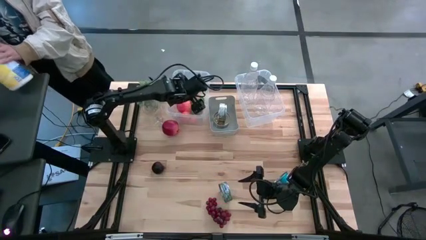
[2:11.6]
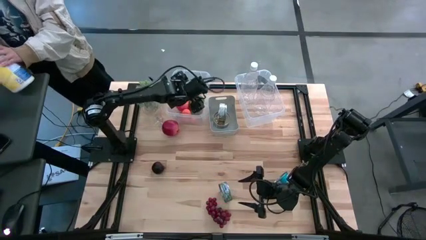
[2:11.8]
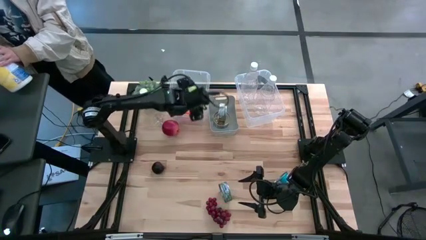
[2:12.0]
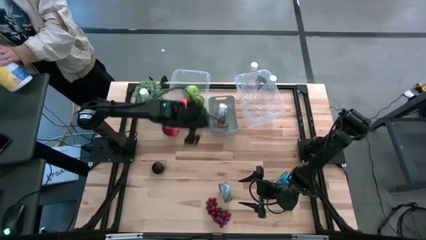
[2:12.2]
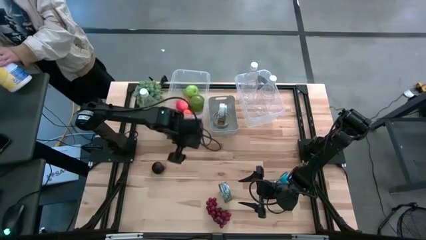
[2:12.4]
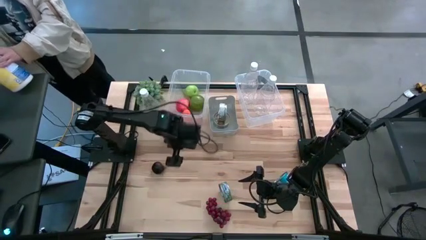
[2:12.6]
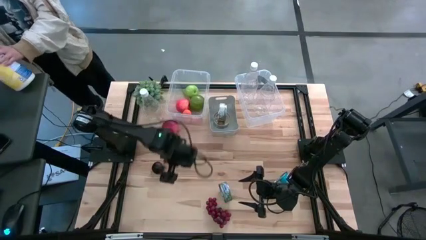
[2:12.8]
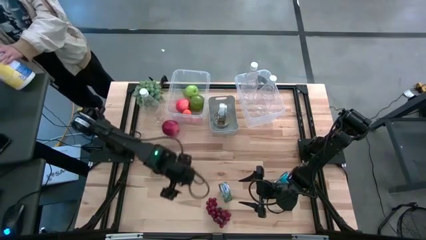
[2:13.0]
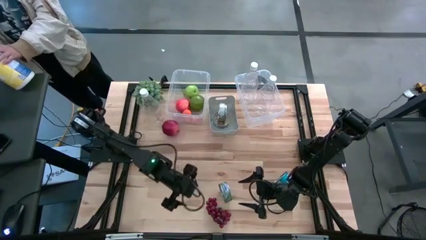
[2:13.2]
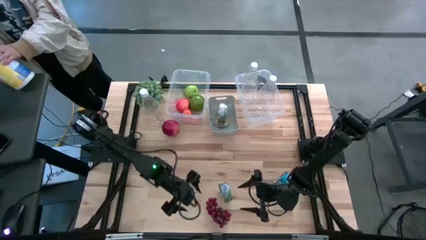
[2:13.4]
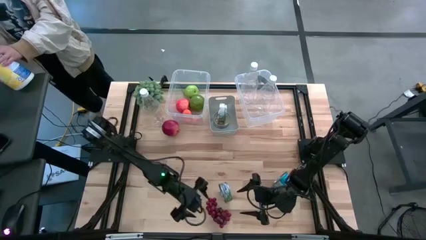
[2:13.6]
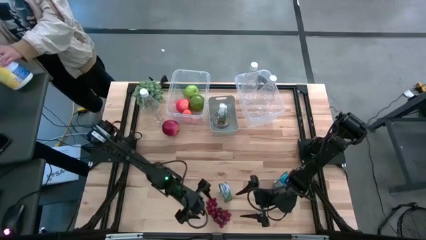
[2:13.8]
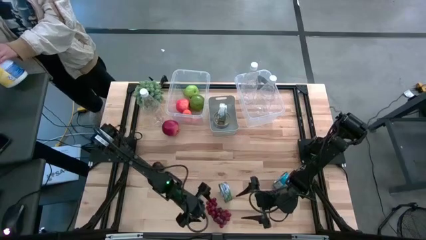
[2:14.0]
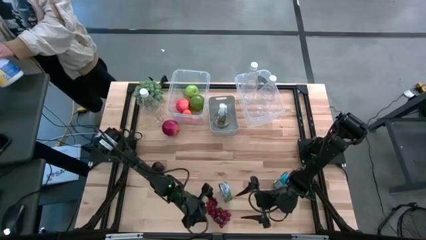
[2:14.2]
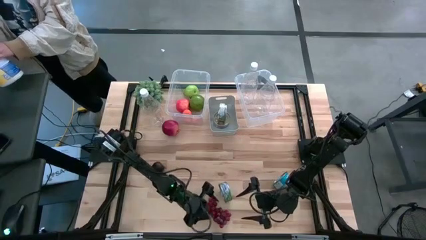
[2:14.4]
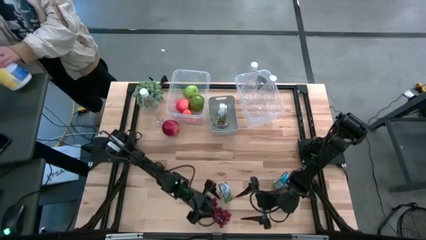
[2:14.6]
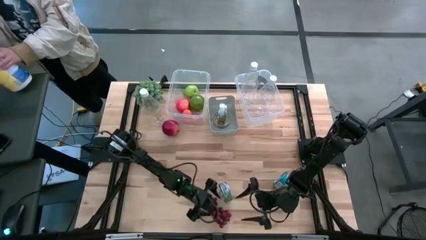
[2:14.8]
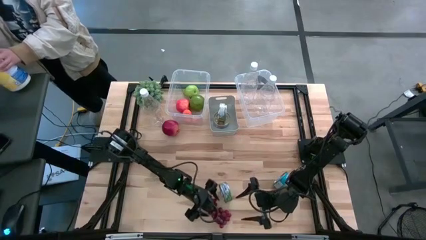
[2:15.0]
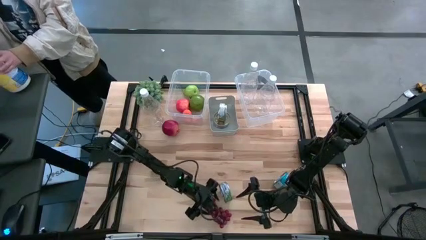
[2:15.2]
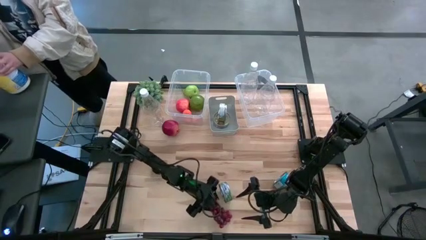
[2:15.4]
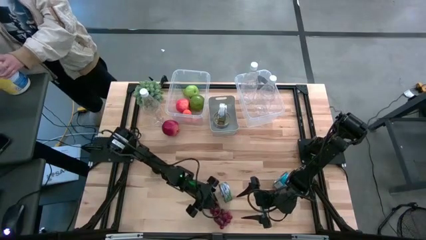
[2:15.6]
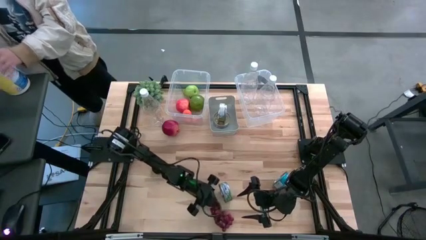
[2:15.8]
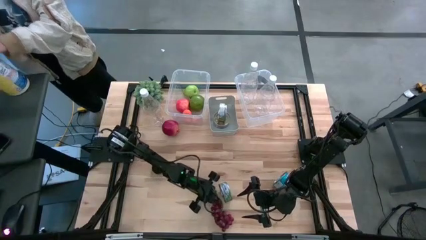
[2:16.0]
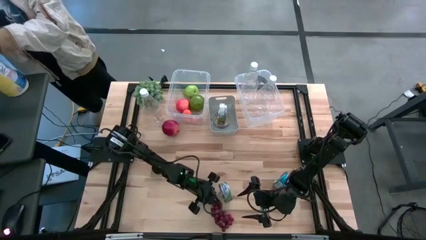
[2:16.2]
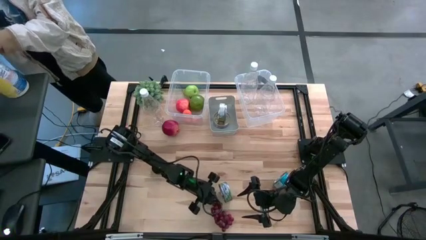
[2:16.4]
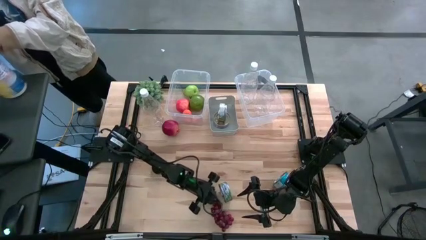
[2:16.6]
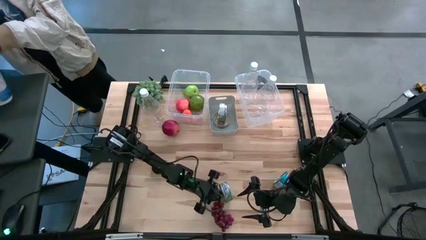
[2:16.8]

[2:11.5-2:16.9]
Task: Pick & Place Food Item
Put the grapes into the left transparent bin

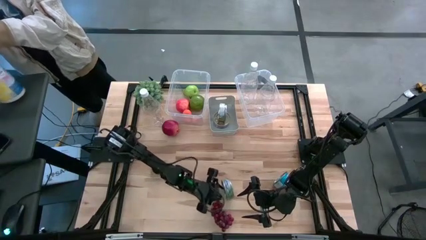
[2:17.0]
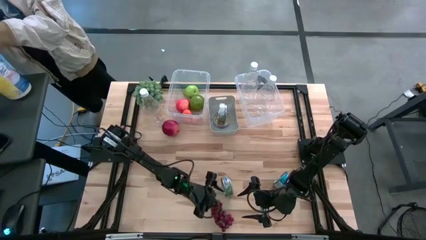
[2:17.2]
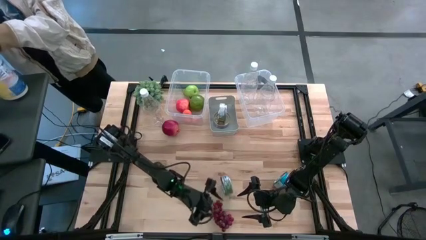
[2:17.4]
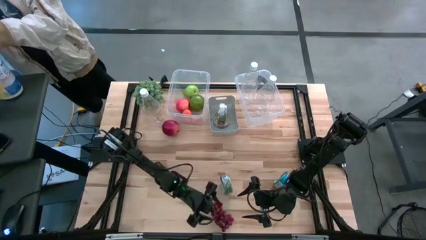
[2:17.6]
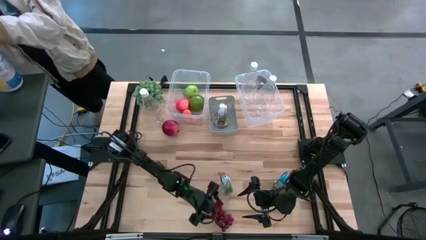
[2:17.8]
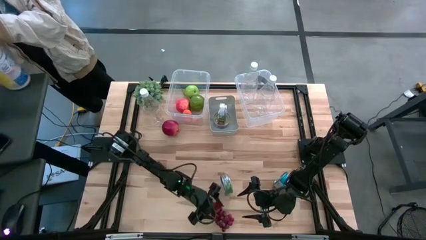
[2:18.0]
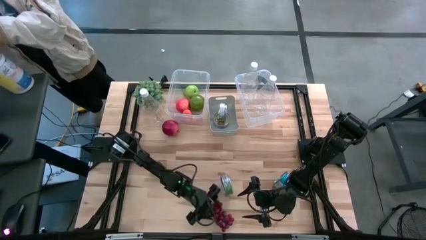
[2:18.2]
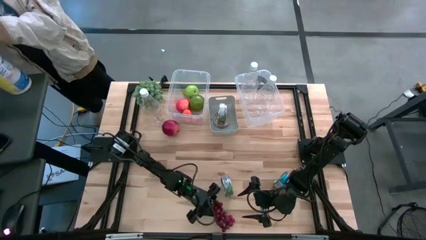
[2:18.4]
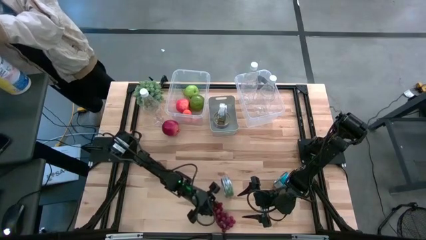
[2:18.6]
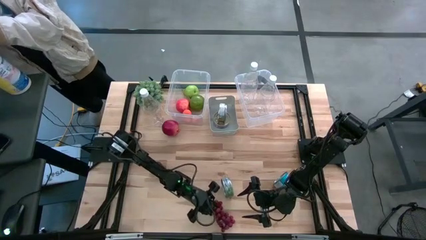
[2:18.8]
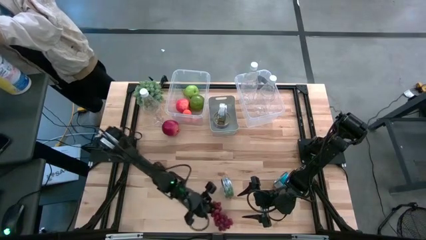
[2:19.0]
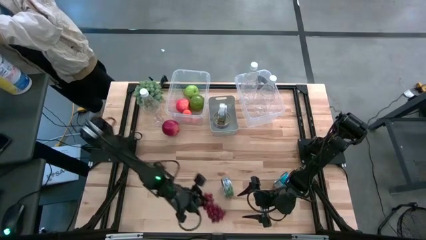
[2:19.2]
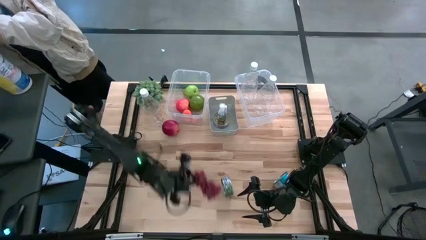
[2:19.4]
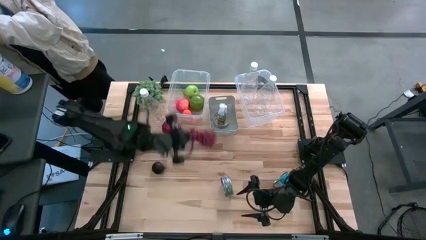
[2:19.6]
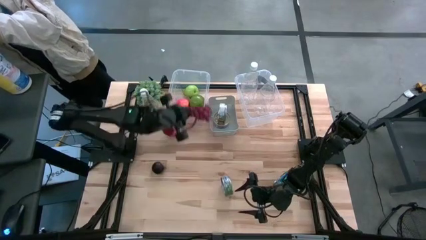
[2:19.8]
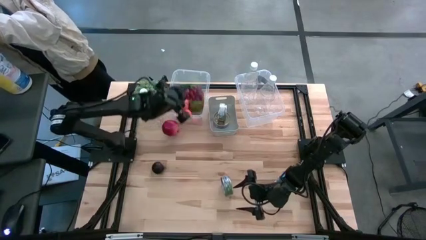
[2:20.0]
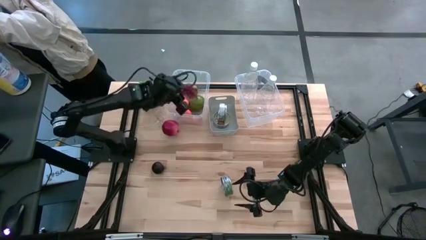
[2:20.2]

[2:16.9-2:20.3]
Put the grapes into the left transparent bin

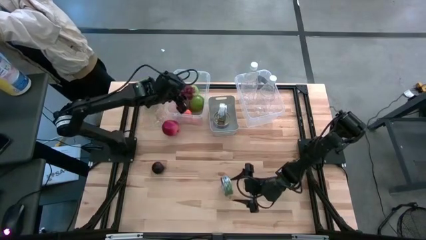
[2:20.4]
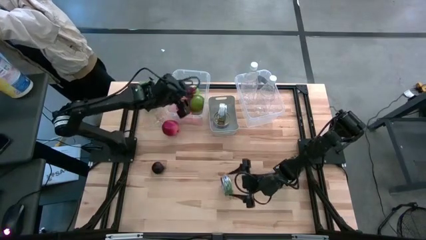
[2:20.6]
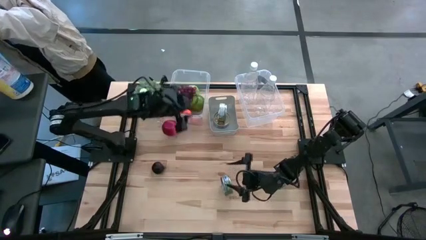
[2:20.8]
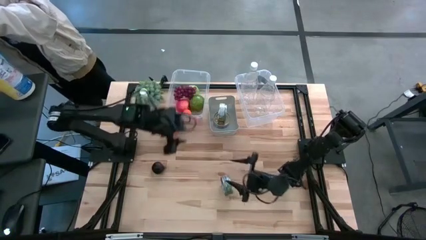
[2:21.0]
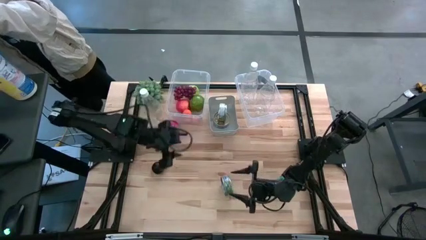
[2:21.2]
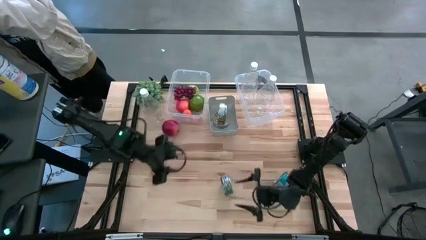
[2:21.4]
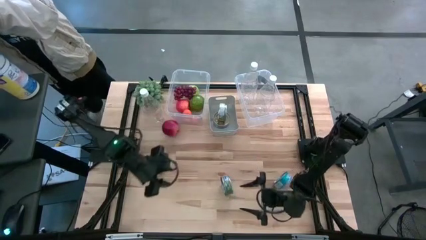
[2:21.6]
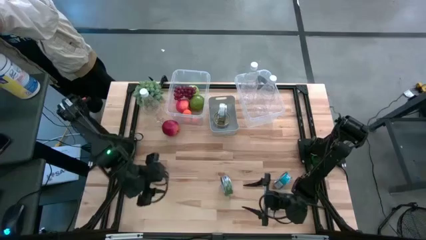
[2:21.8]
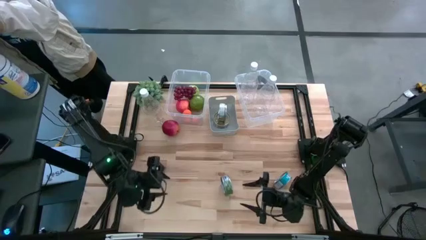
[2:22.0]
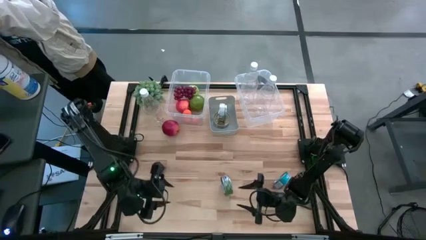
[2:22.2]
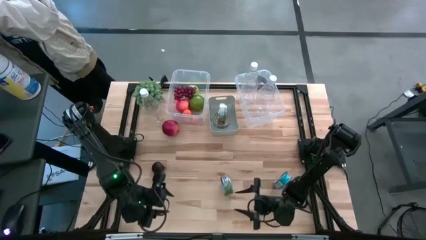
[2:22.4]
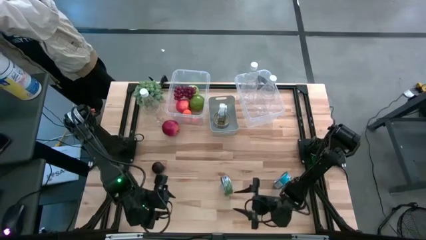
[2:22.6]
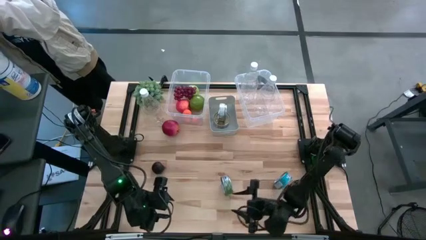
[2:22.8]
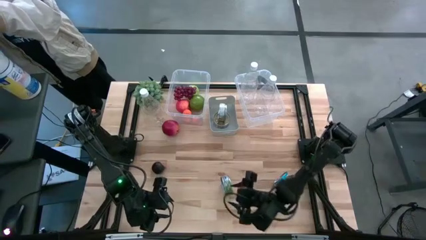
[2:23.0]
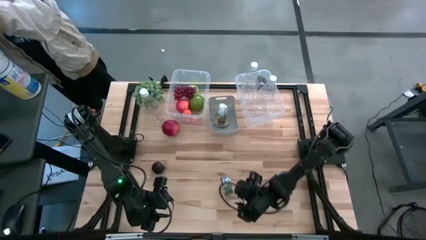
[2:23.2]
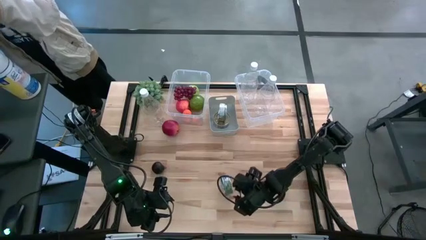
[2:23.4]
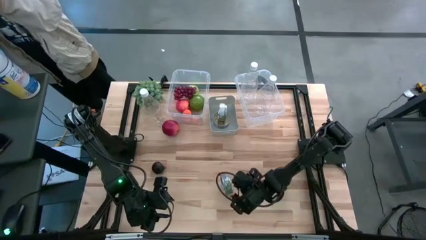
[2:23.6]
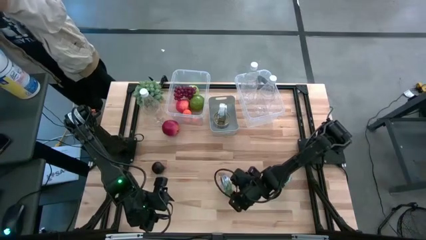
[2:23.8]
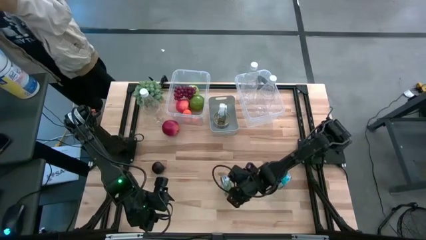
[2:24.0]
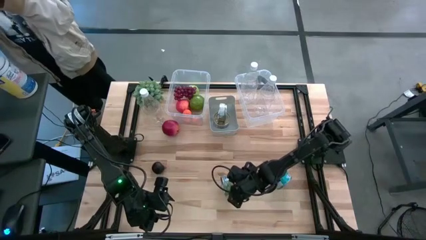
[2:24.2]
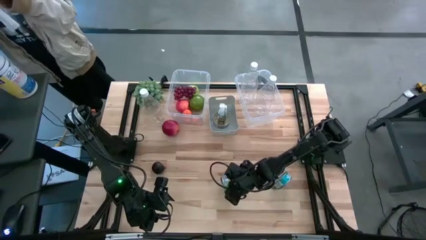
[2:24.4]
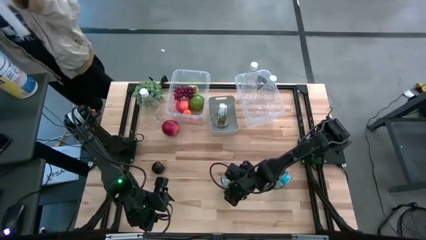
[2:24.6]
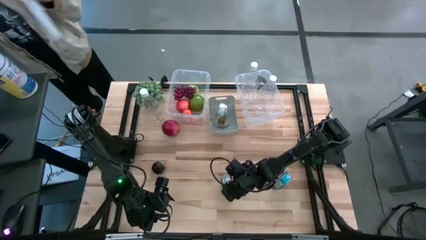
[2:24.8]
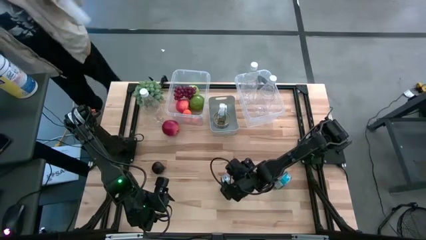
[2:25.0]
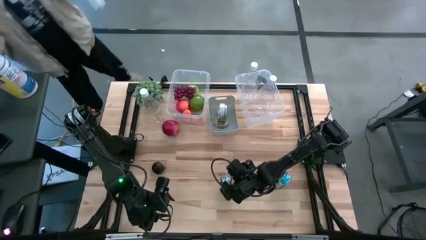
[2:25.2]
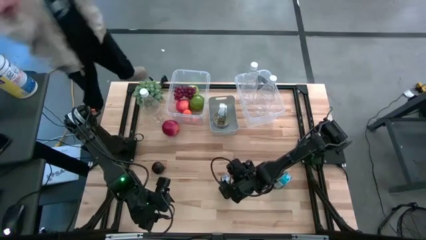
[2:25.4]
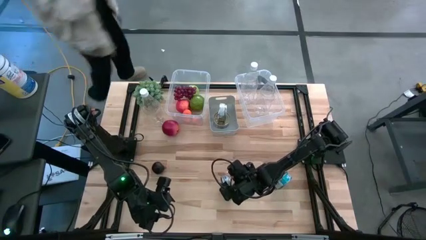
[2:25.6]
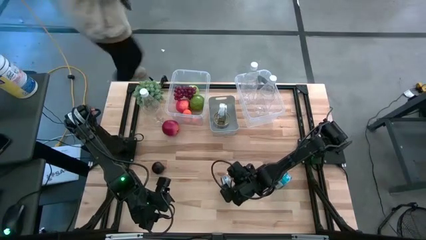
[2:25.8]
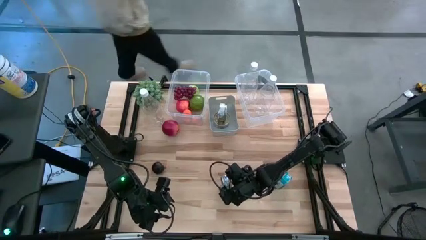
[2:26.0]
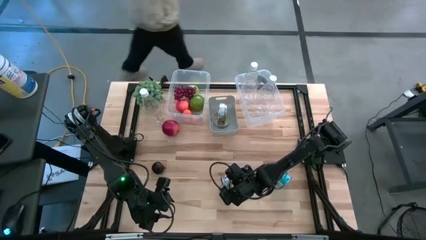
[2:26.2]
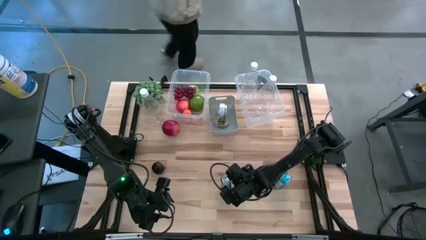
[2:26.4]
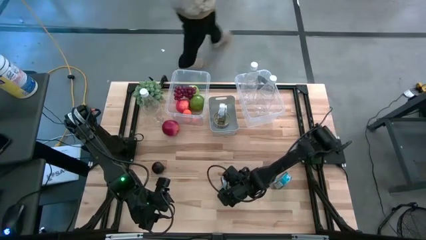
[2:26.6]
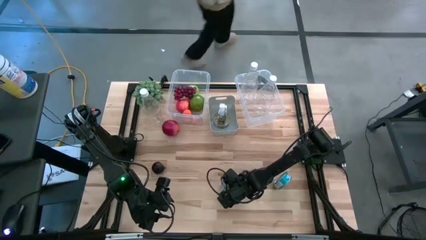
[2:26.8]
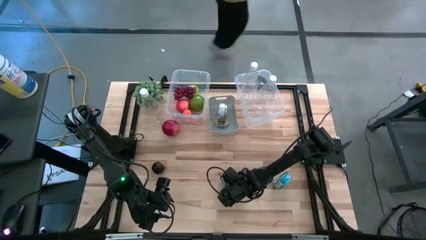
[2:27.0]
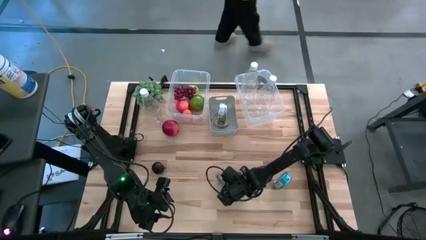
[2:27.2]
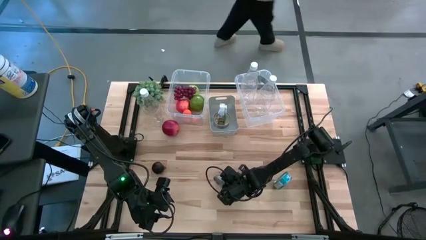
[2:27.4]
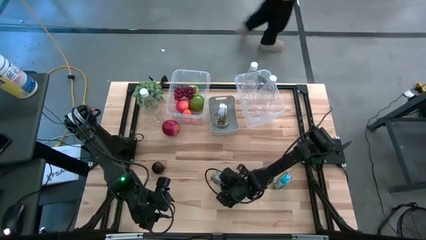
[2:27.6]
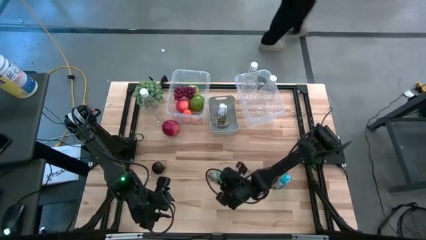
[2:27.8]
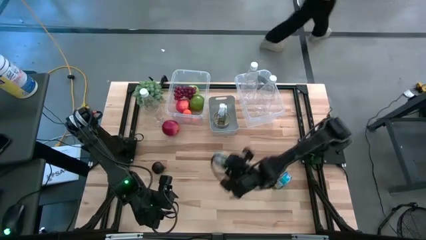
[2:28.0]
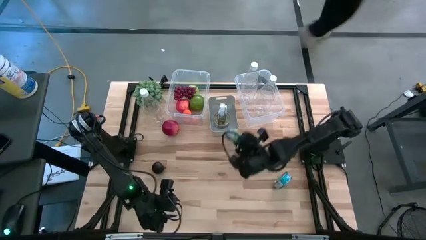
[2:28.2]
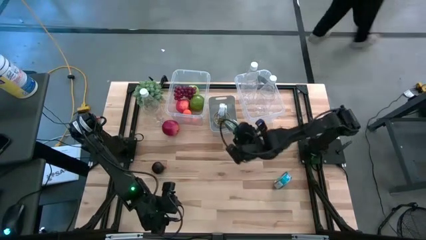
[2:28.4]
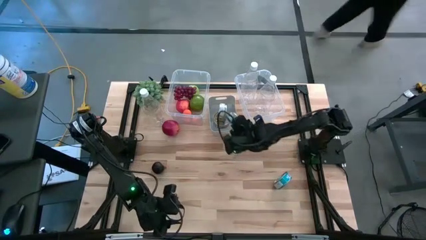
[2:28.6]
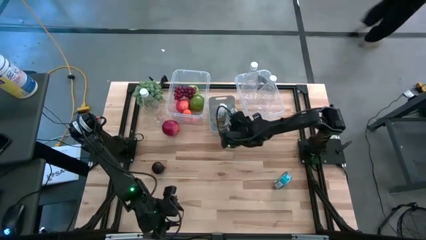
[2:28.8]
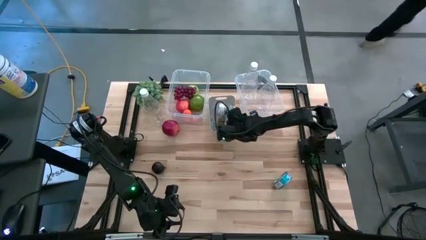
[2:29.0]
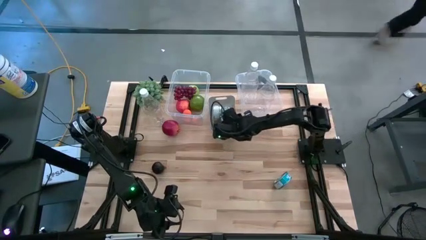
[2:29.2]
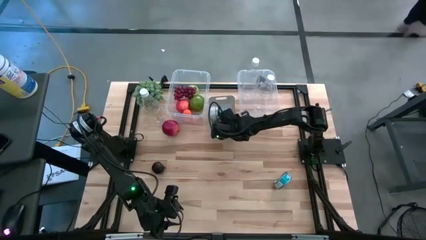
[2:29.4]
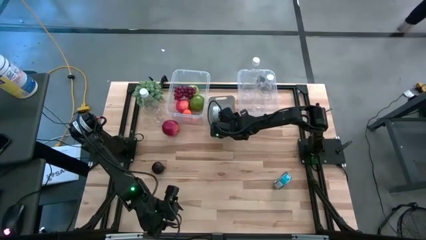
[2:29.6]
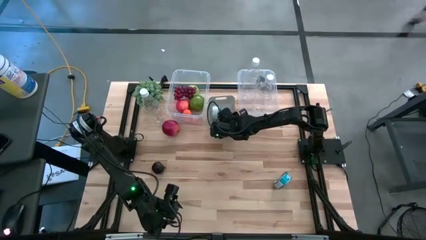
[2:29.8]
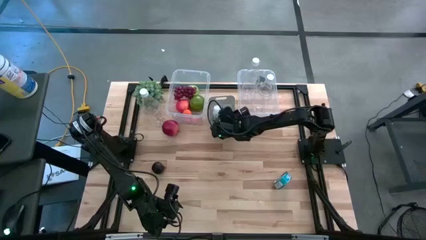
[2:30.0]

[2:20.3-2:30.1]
Put the green tuna can into the gray bin
